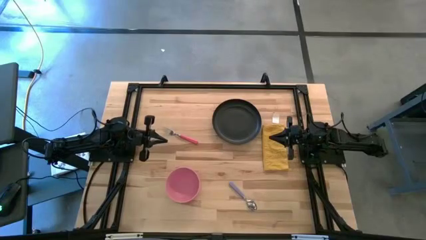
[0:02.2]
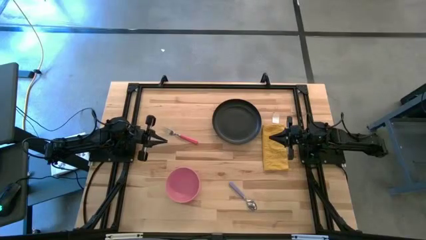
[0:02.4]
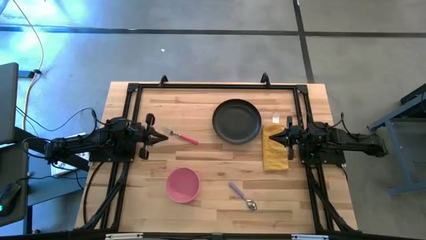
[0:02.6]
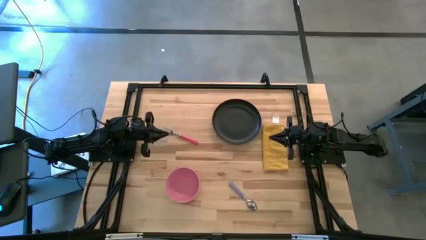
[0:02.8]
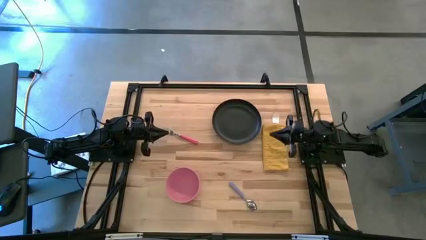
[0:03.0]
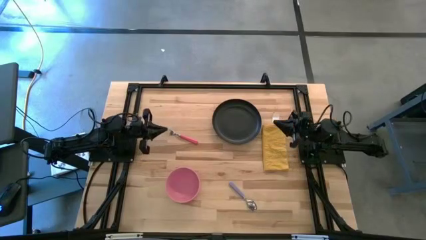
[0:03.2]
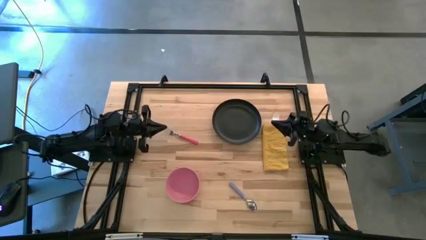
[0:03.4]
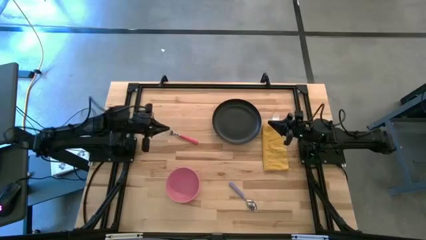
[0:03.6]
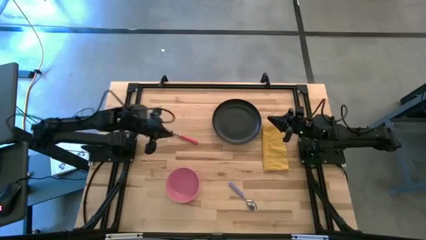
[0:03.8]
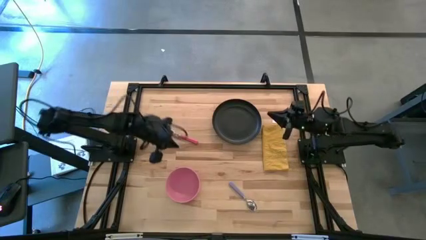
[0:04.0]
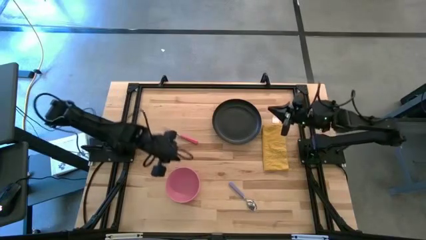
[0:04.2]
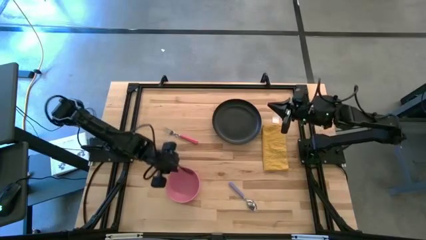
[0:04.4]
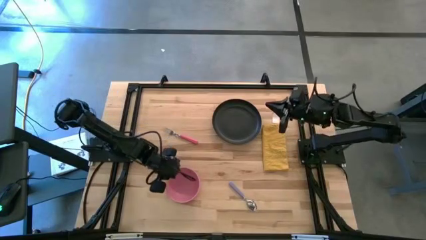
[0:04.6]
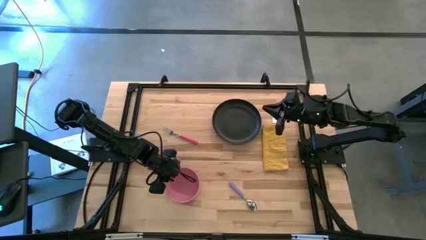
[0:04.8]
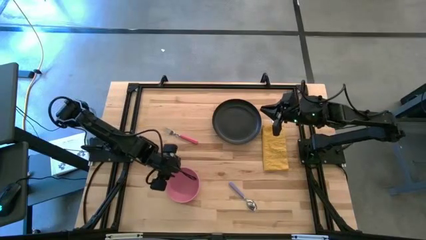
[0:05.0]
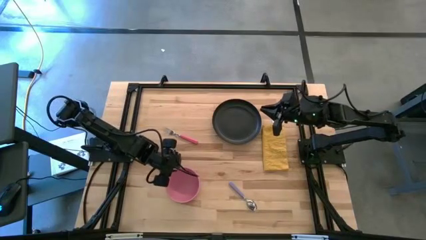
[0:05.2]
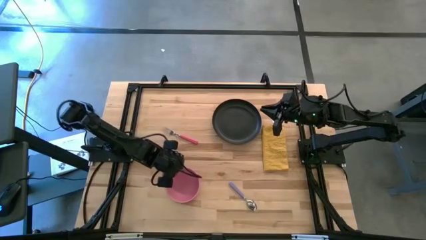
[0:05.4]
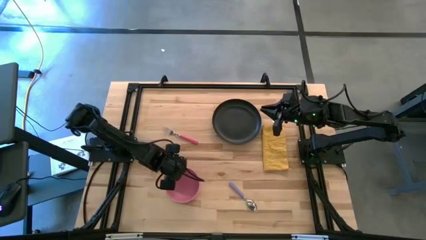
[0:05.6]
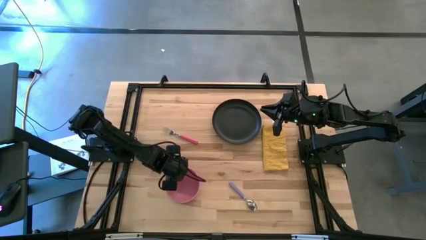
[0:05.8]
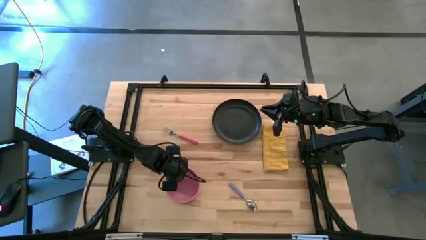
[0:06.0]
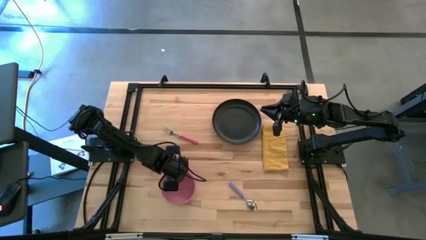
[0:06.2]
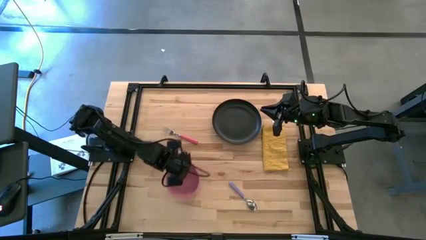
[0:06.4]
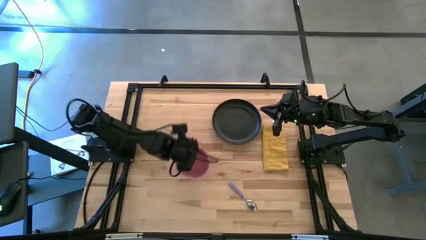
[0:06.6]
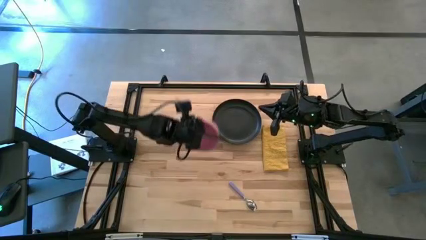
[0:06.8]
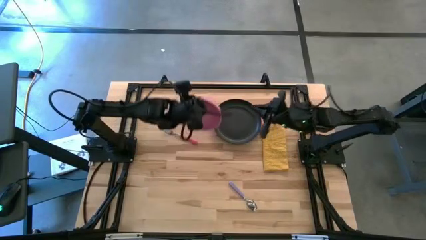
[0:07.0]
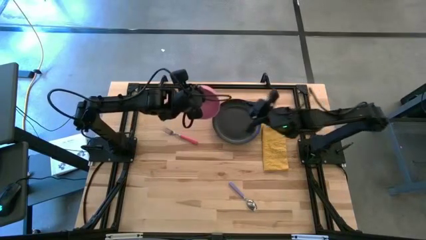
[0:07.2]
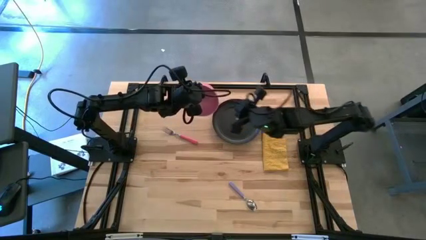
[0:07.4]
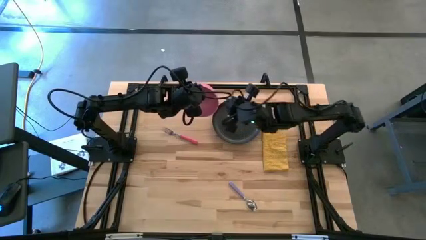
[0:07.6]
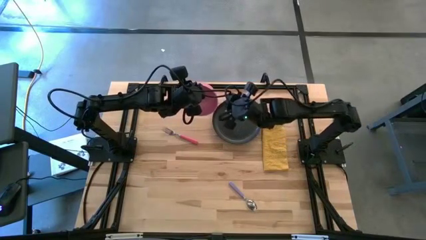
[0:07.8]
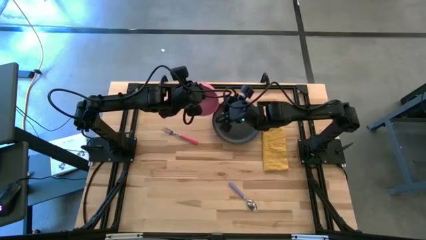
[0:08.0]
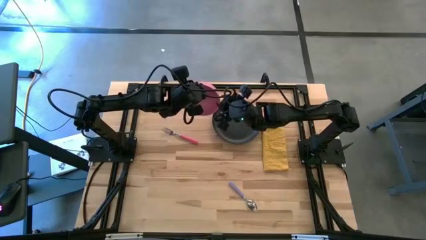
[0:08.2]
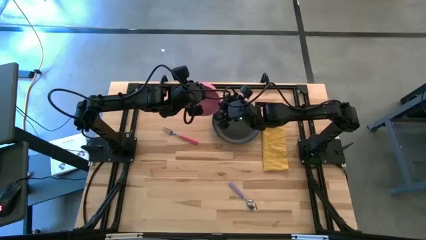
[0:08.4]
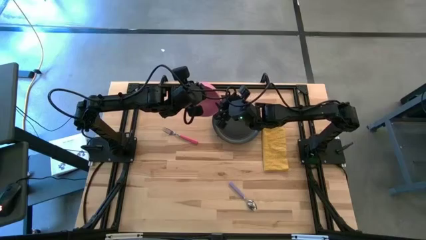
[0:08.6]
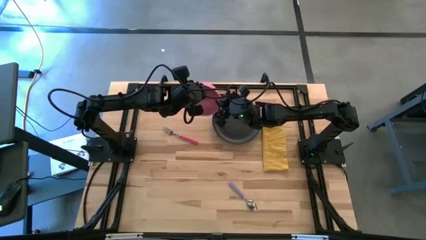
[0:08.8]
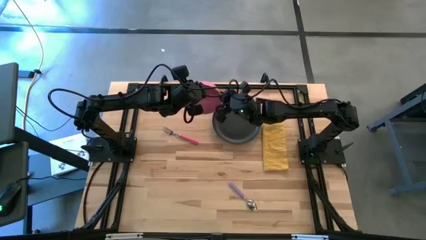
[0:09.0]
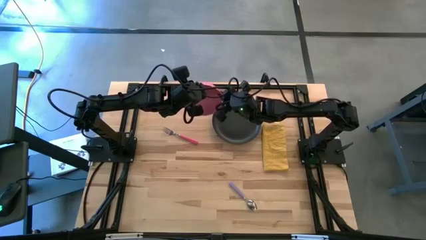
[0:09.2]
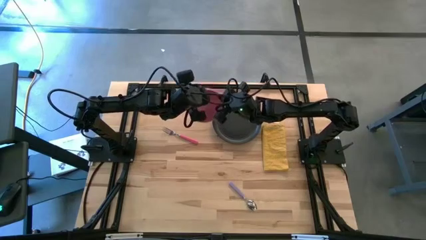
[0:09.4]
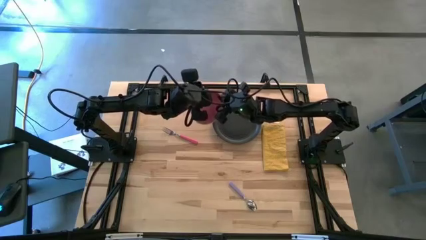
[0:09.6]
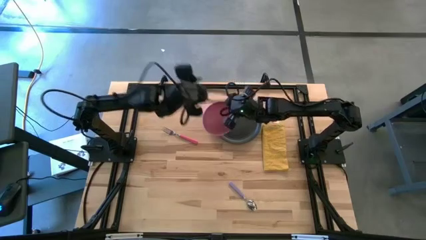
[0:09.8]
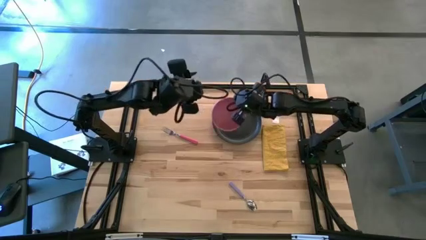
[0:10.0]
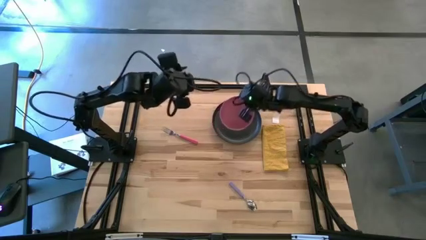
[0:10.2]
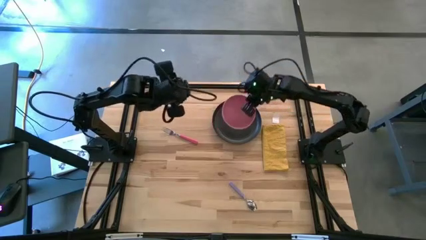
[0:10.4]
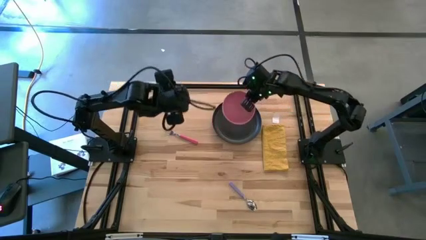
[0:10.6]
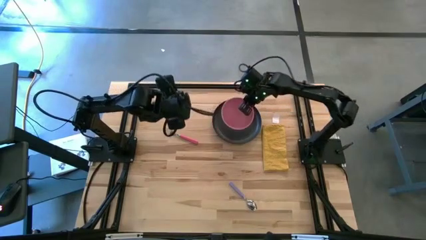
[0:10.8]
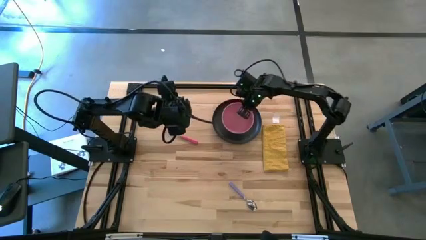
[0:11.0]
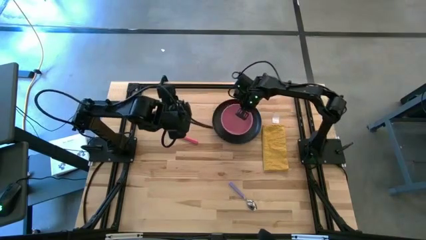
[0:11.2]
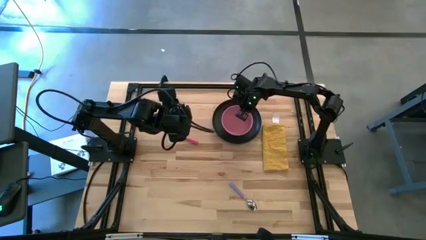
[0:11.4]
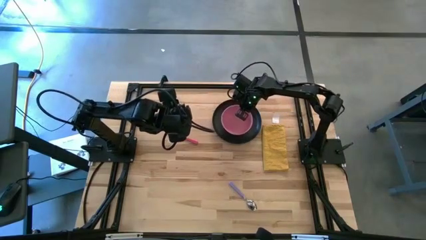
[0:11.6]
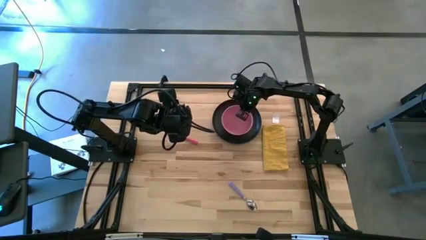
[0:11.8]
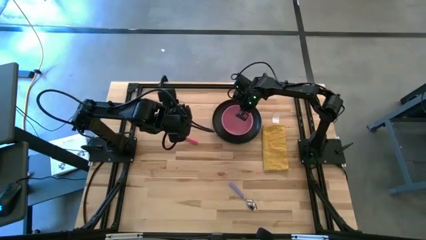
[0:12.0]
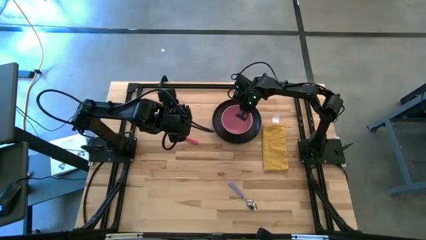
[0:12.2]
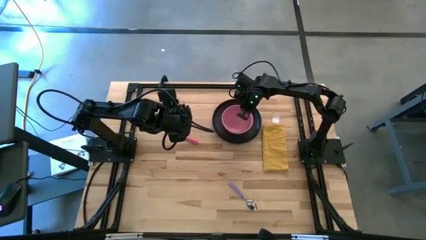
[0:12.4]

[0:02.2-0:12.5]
Task: Set table place
Put the pink bowl on top of the black plate

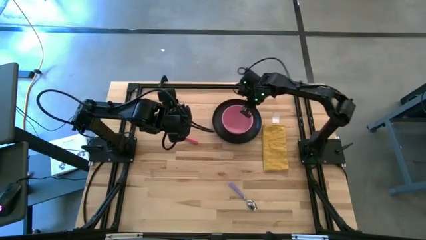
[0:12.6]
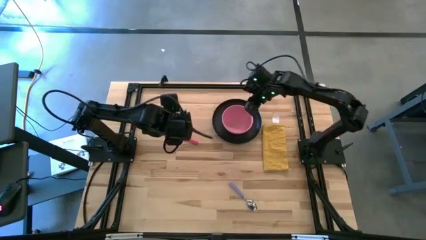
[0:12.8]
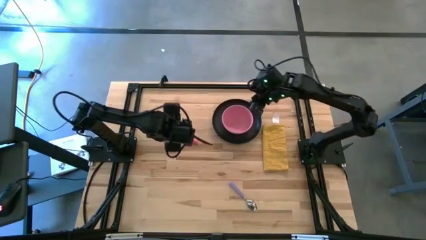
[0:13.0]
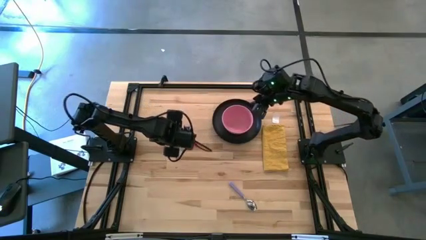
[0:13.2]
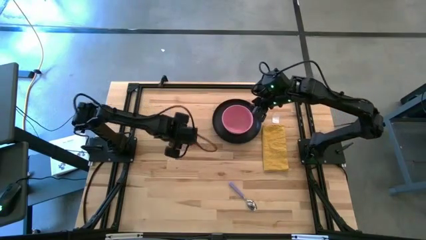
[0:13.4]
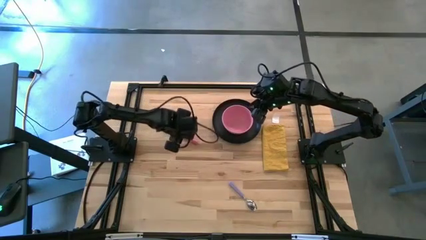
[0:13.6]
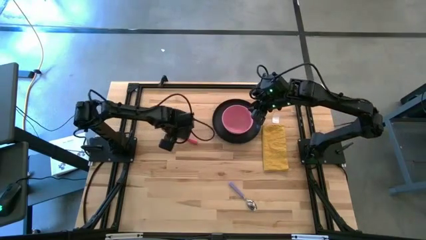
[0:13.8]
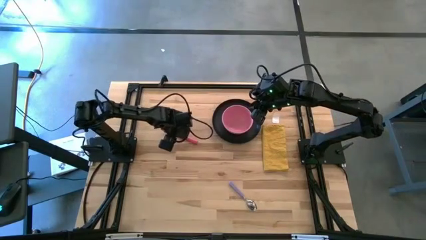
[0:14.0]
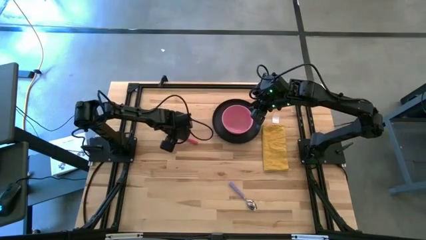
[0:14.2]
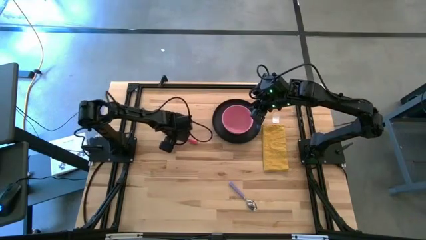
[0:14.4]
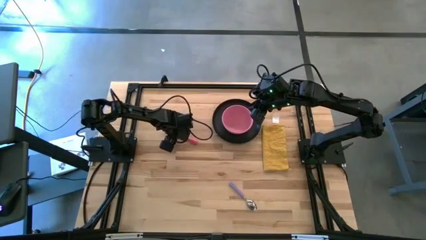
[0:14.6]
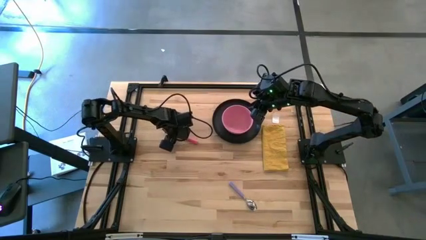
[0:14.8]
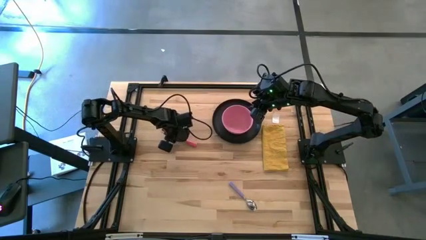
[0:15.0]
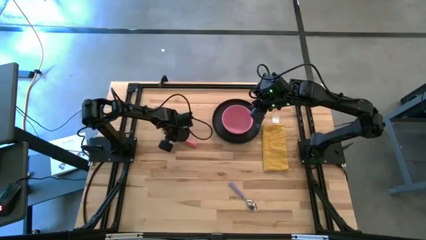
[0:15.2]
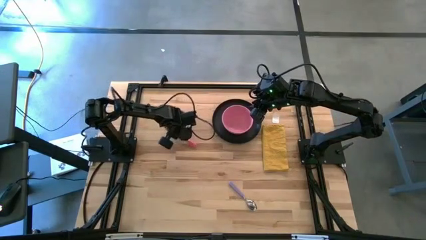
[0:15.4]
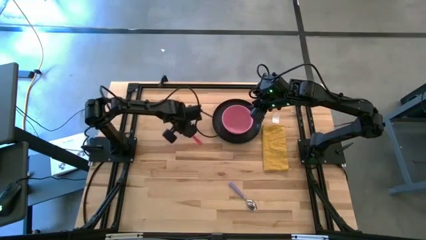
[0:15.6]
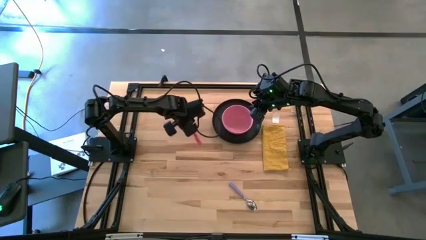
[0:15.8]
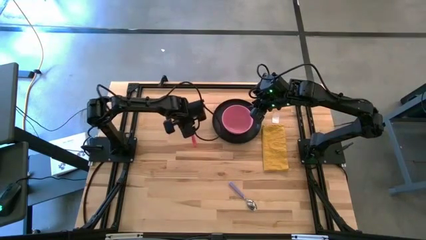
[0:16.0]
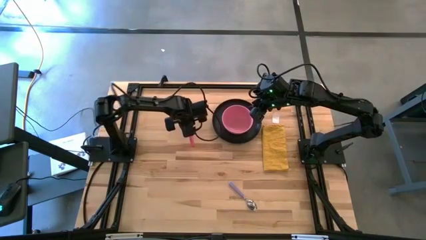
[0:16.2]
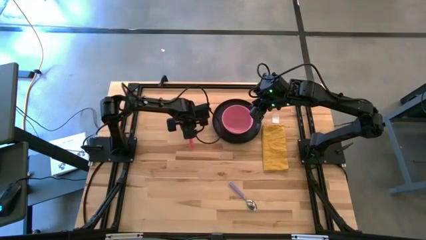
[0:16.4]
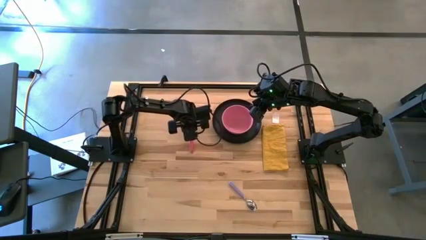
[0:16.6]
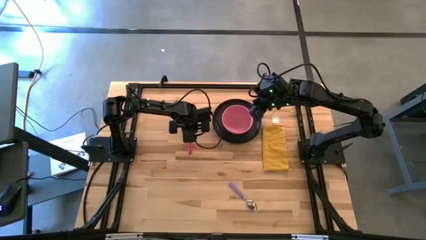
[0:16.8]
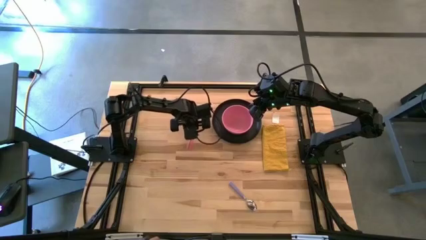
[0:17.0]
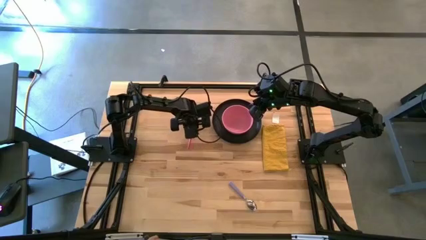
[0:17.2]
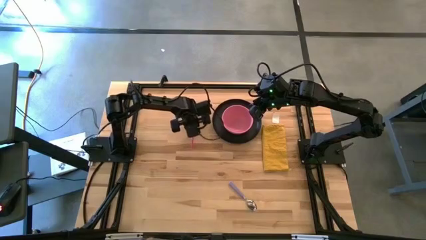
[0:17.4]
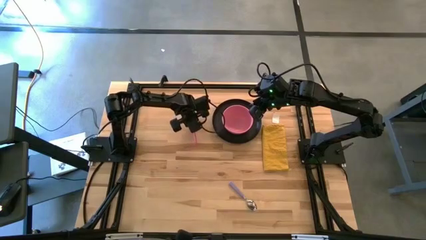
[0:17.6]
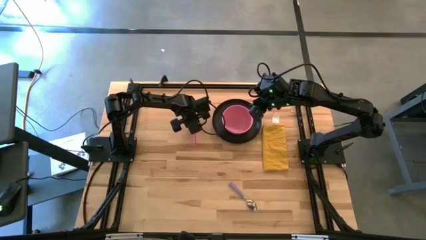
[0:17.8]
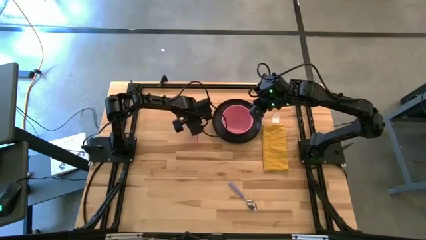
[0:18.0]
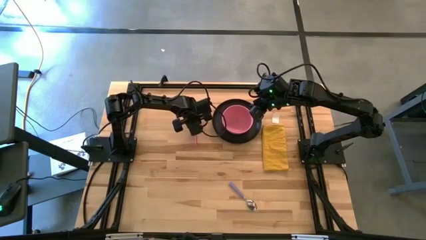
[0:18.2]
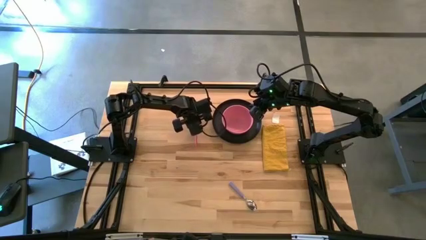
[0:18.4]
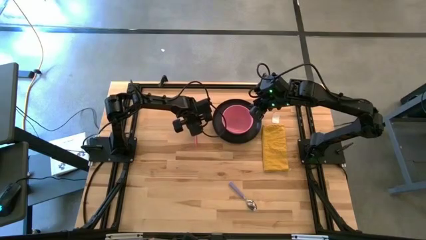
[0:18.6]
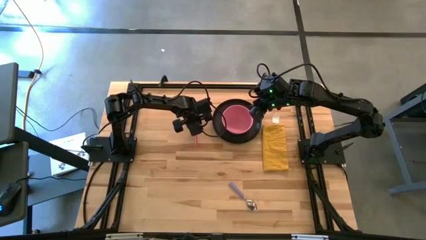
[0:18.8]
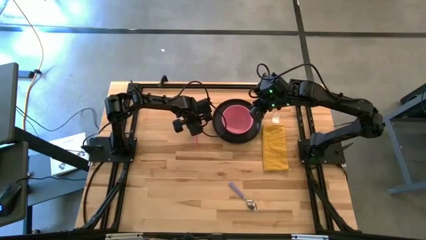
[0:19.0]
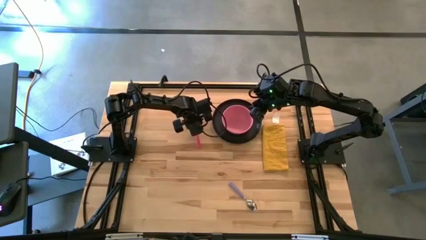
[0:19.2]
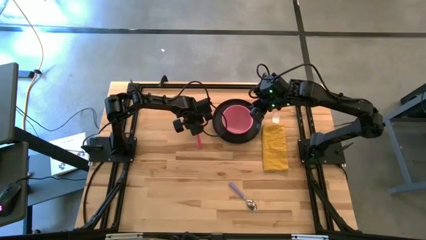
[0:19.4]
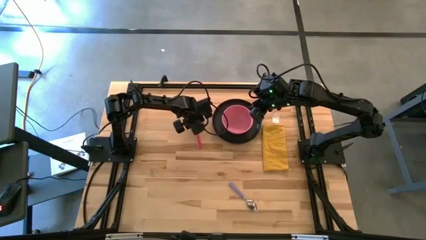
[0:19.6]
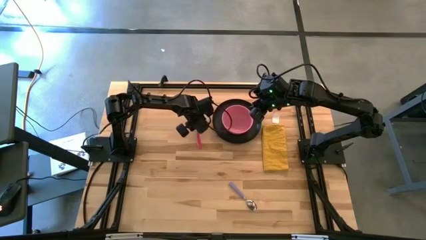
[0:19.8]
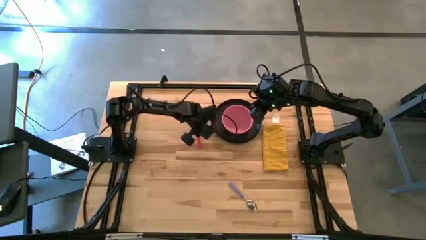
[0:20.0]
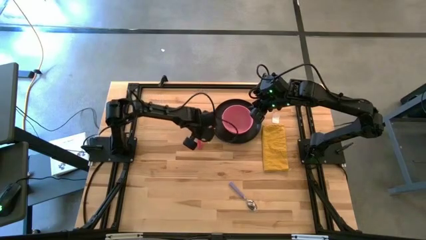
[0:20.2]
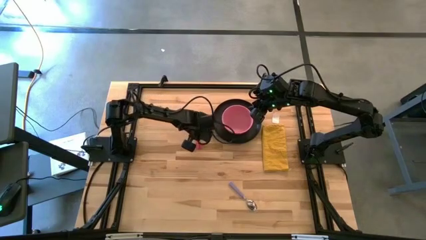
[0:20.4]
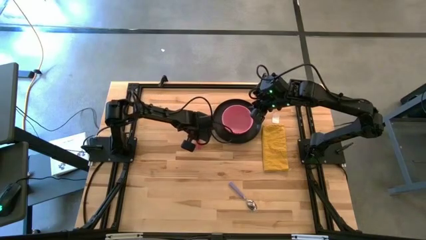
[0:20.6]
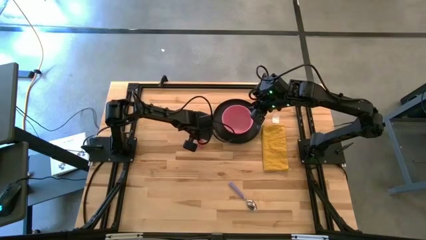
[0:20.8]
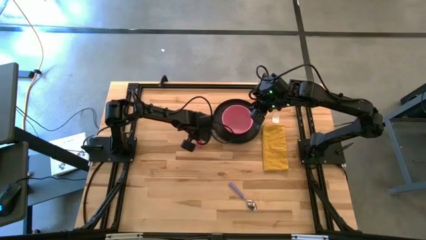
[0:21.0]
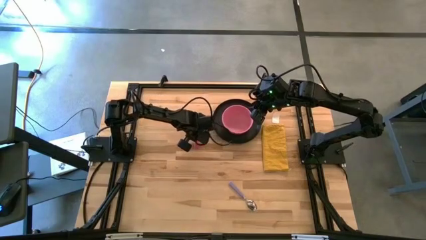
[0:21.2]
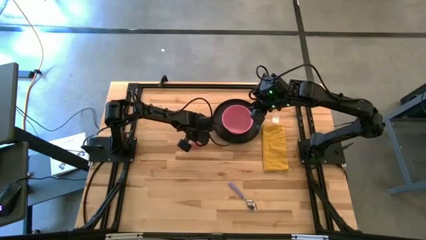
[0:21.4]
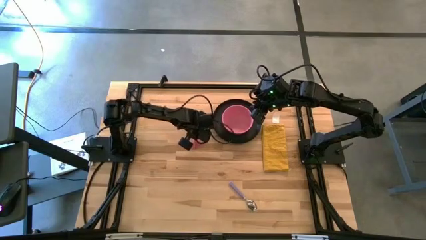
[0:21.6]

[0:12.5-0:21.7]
Put the pink fork to the left of the black plate
